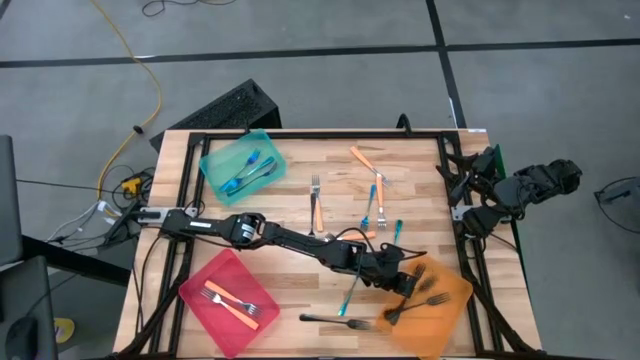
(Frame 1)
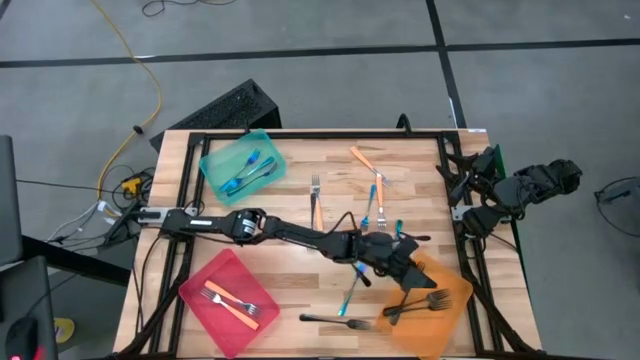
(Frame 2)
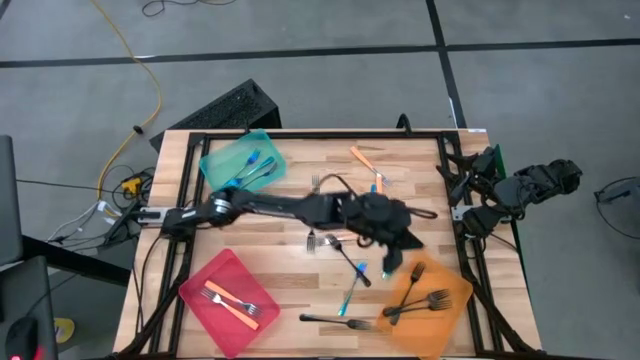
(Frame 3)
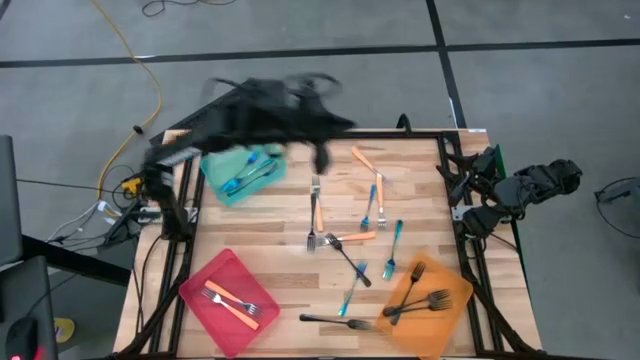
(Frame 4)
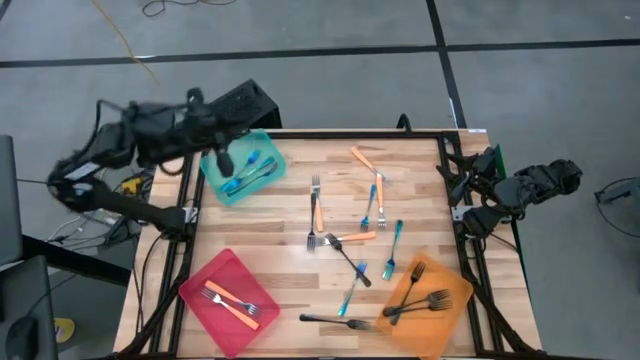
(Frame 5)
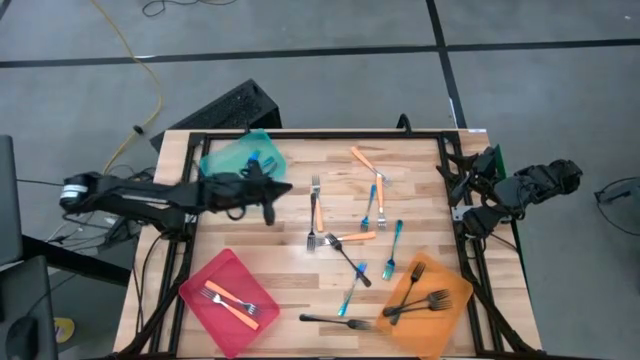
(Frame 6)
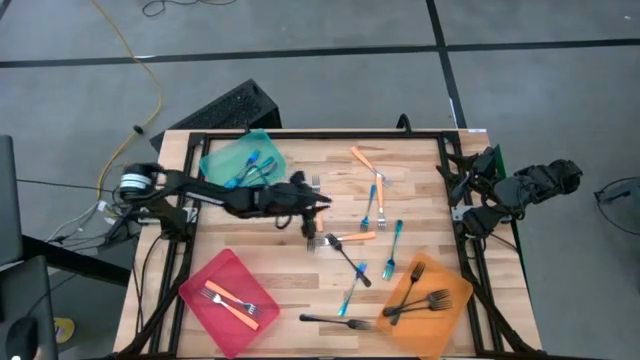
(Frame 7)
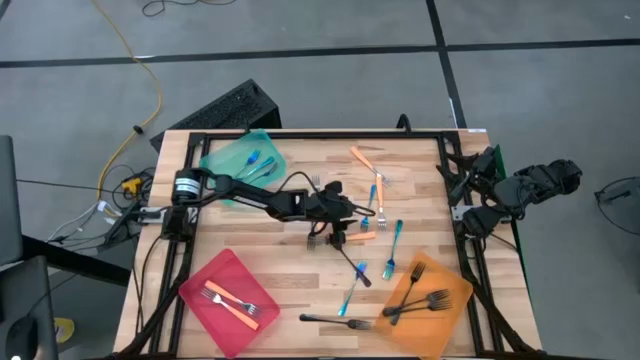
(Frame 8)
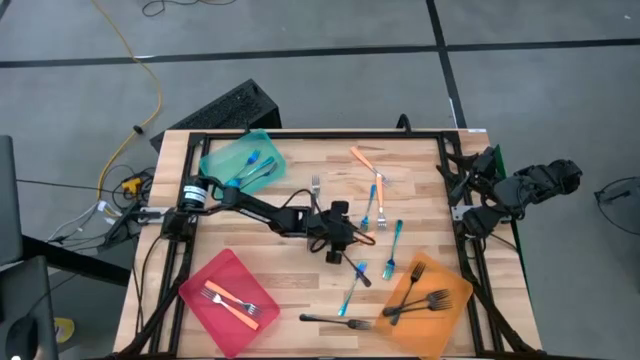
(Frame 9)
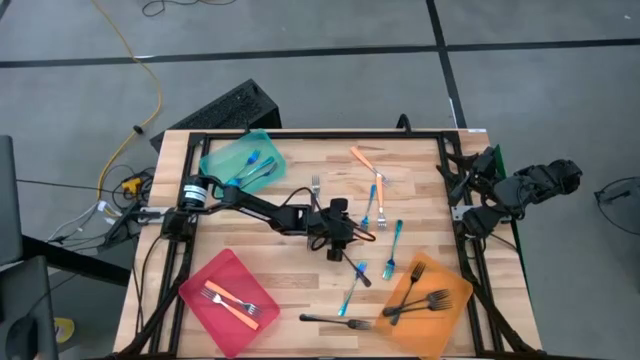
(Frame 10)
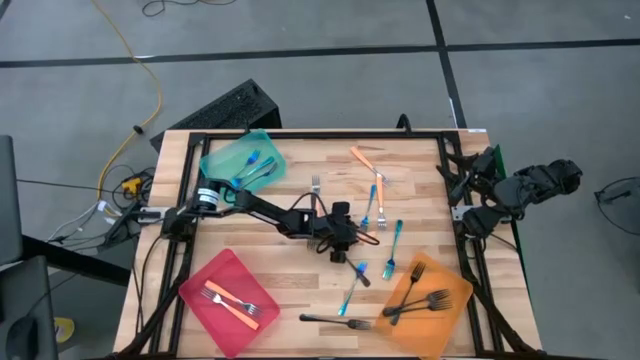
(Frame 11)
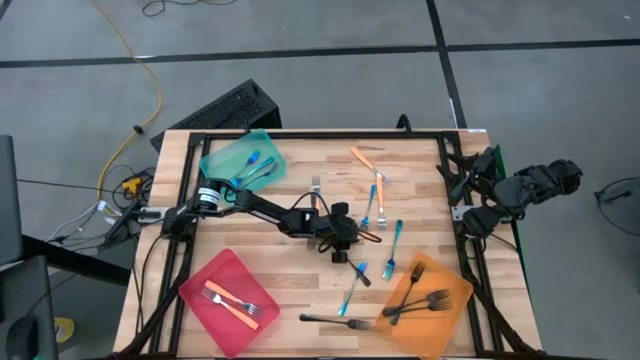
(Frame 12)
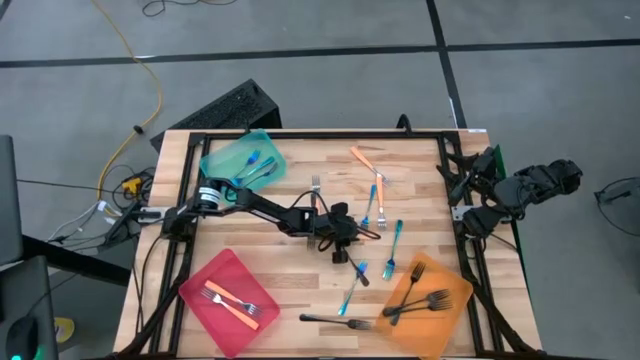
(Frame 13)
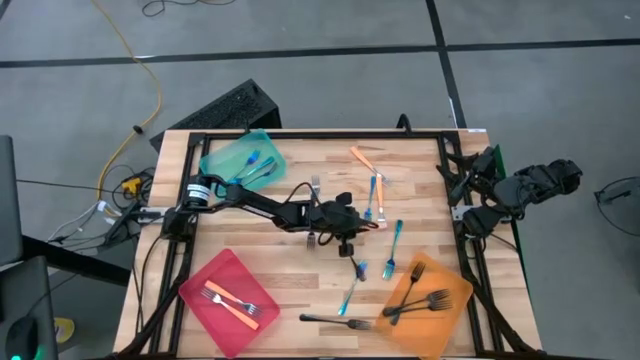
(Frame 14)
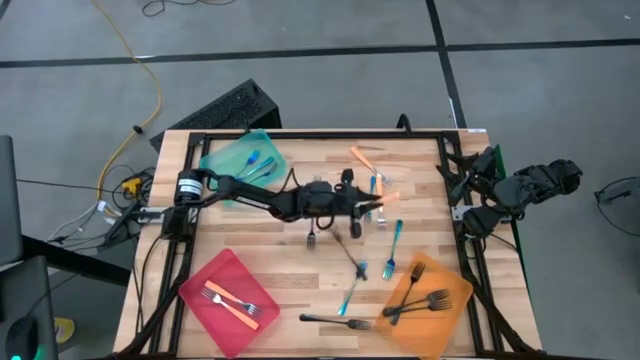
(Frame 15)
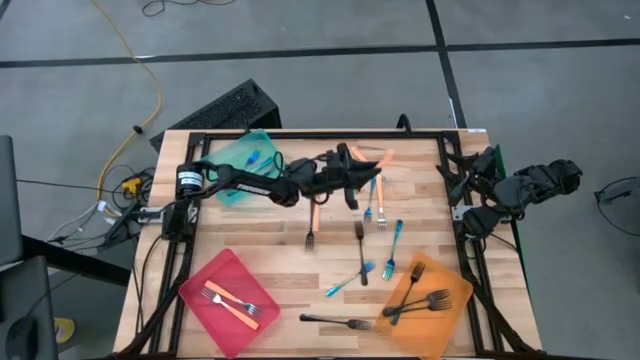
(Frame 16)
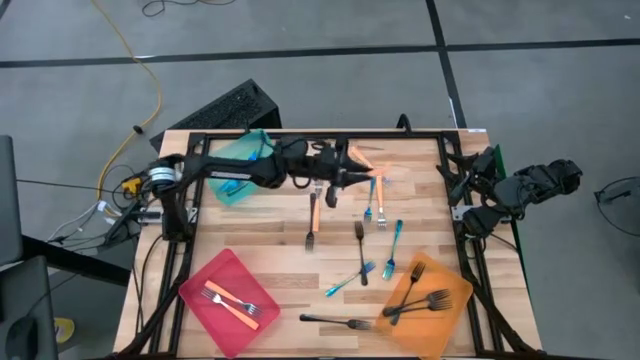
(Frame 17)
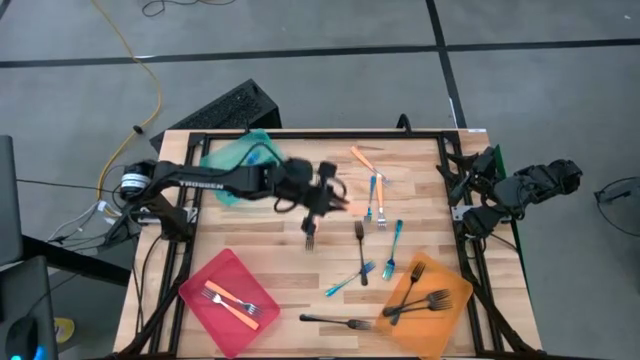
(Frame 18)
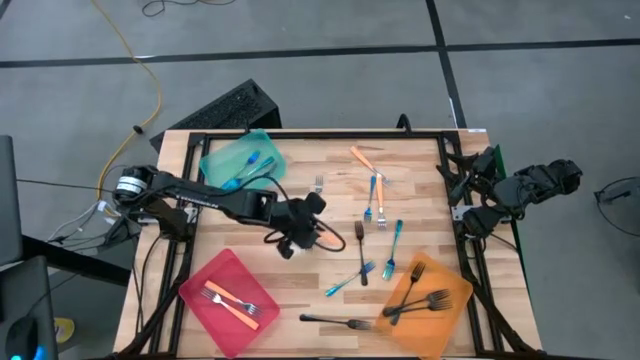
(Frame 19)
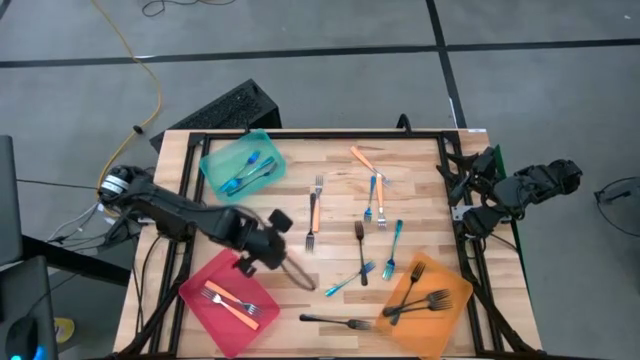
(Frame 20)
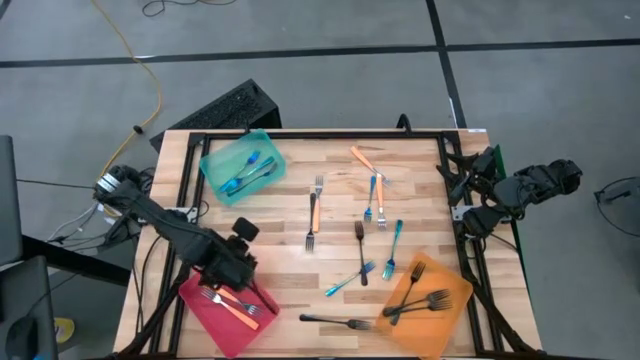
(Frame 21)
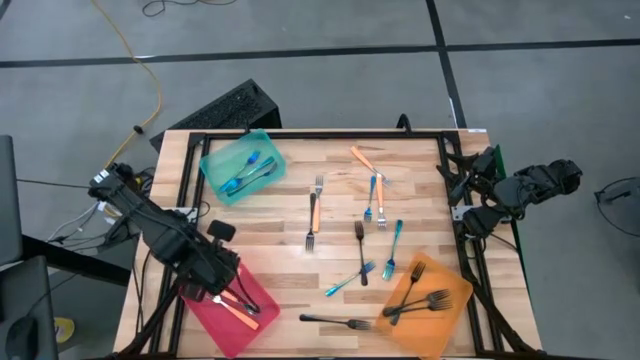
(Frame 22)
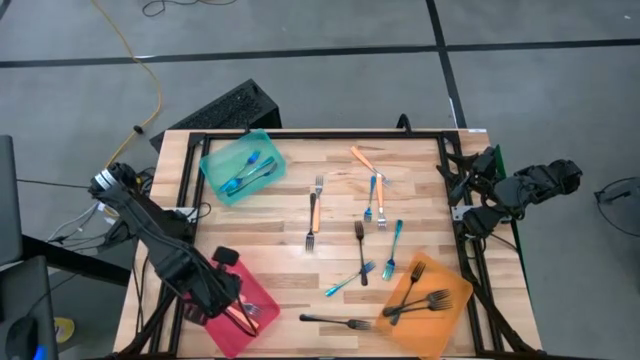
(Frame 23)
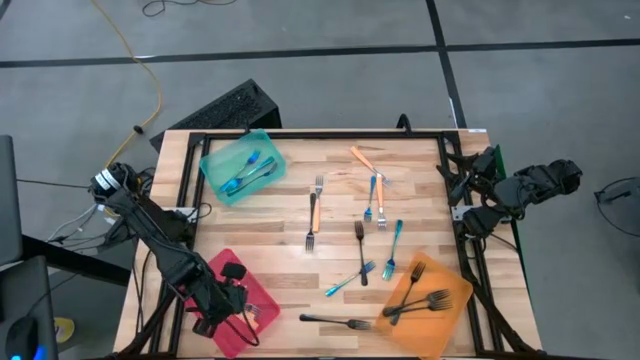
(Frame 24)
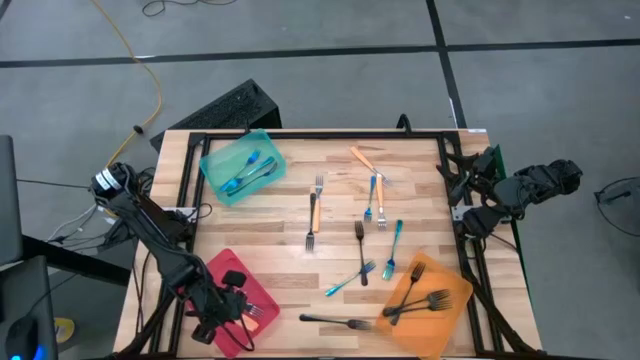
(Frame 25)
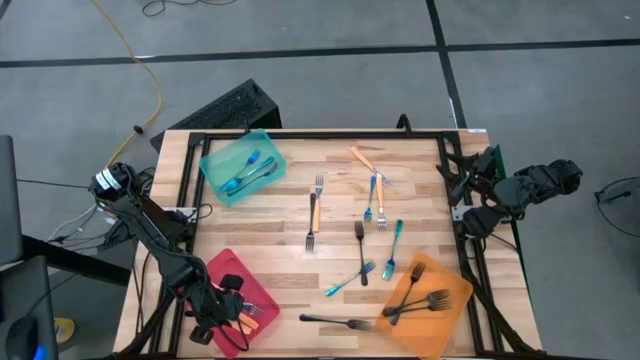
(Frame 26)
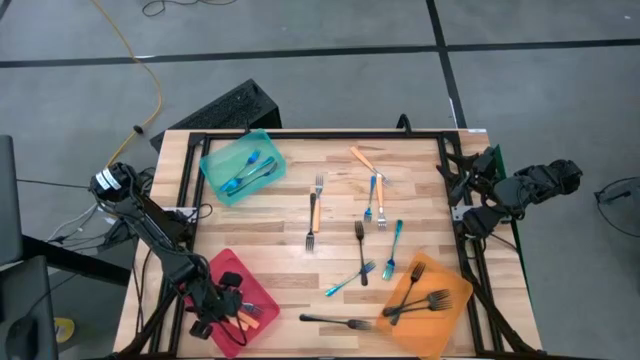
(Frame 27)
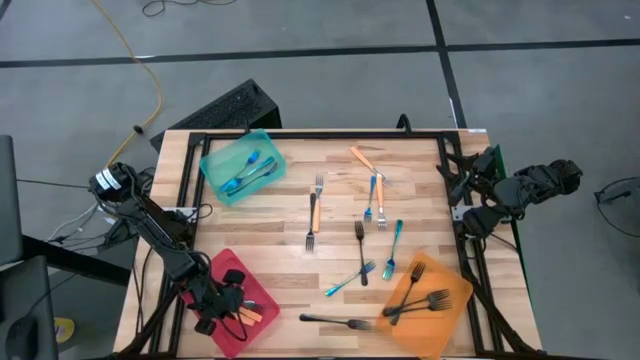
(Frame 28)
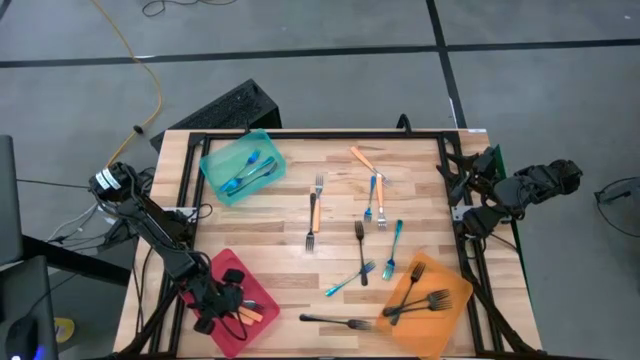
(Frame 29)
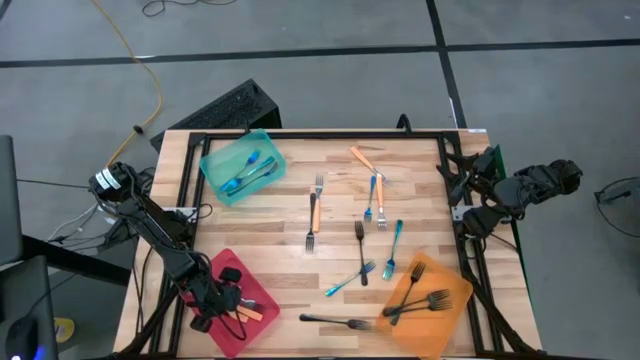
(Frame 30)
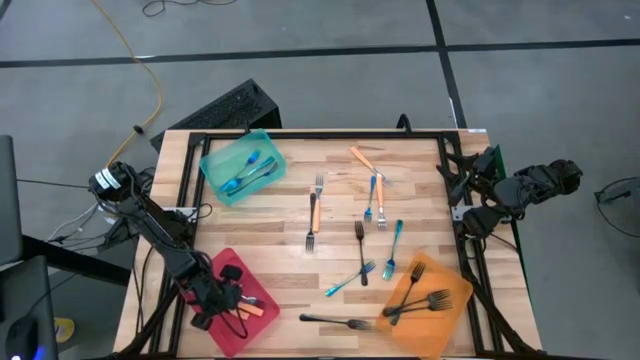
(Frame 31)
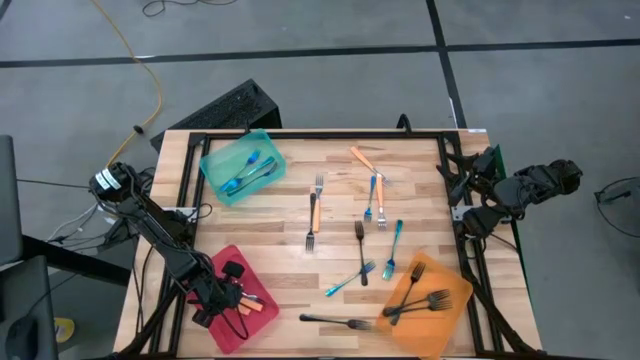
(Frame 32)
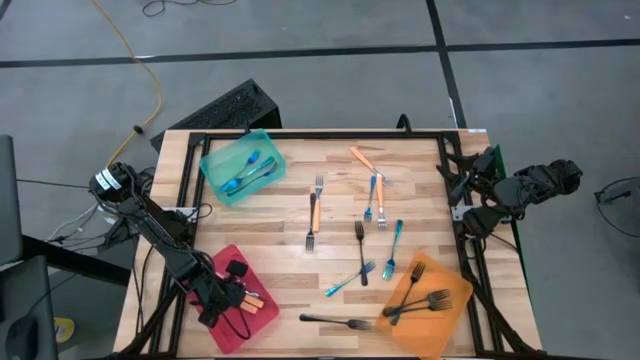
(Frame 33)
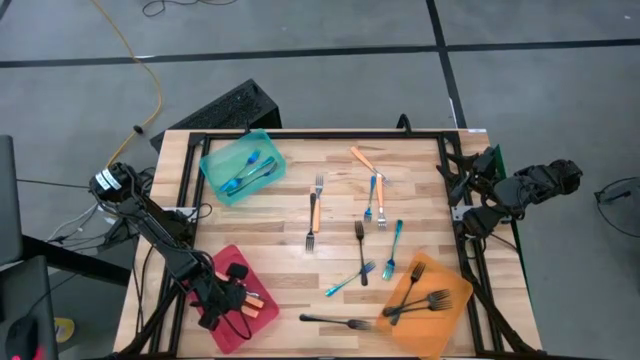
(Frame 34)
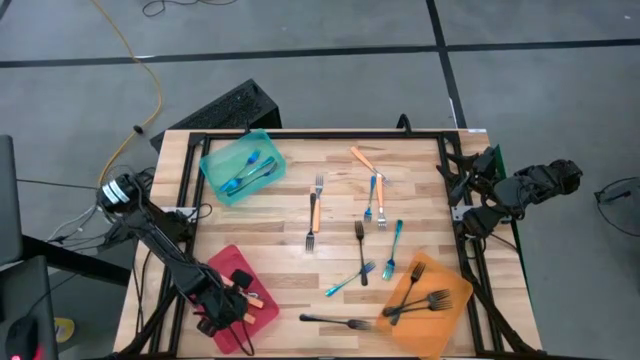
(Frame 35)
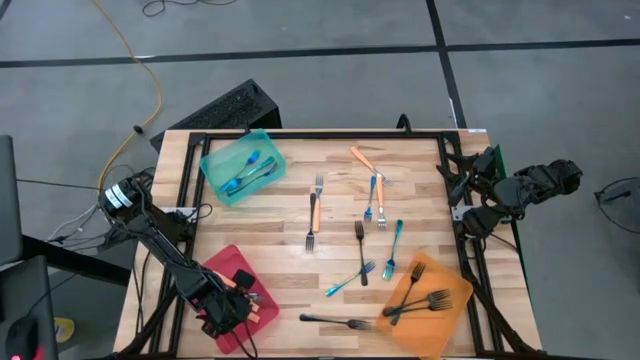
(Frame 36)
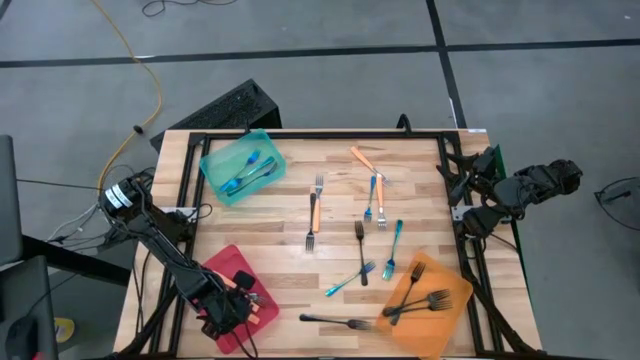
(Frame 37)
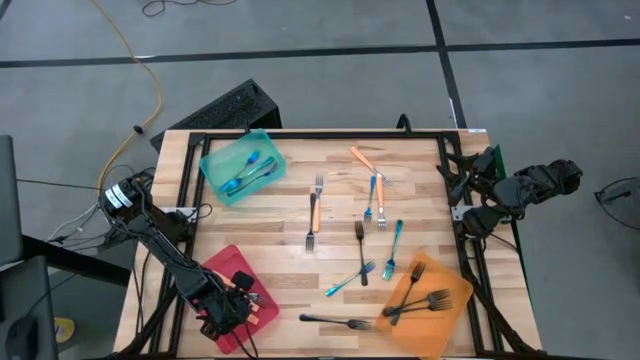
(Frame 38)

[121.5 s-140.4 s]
Task: Sort silverware by color (type)
Put the orange fork into the red bin
